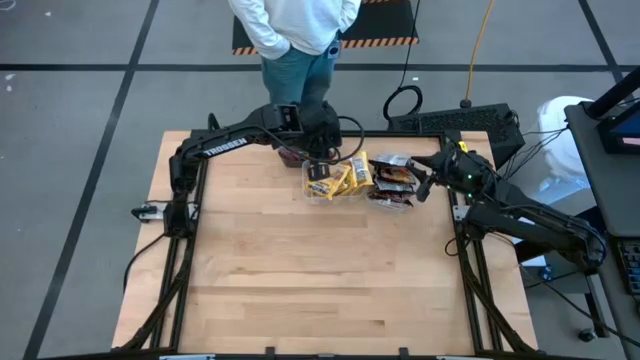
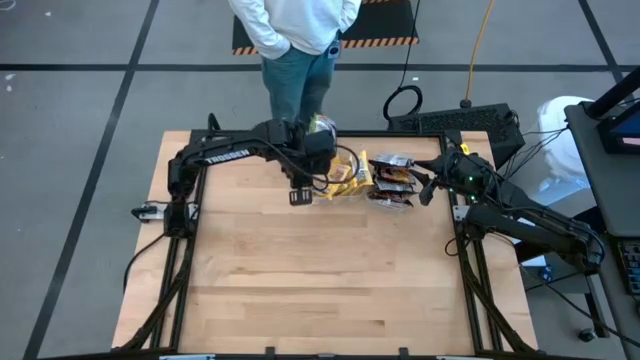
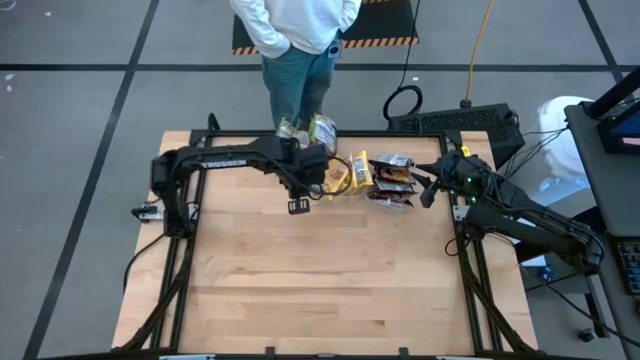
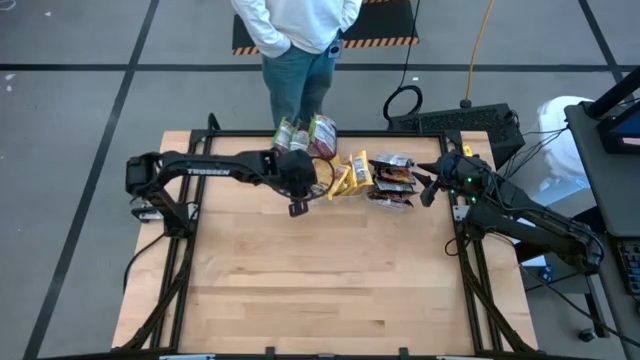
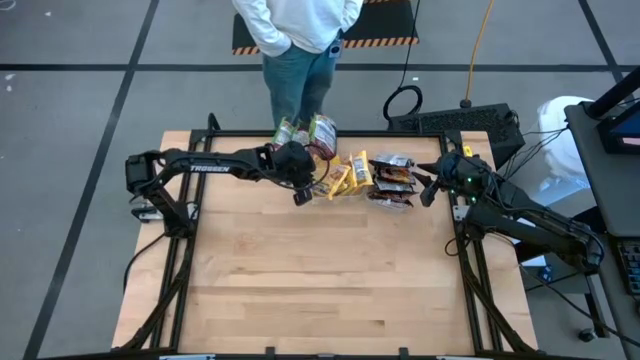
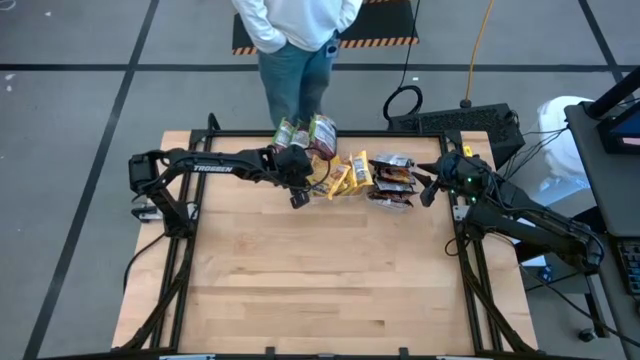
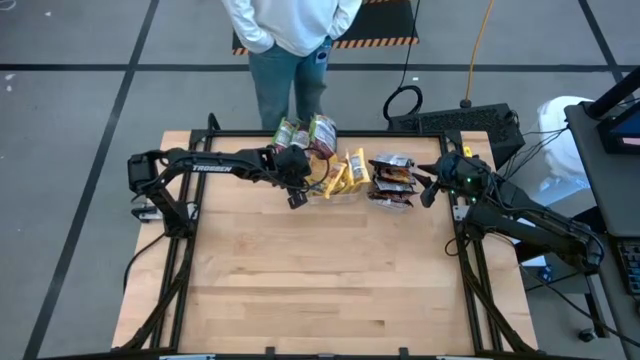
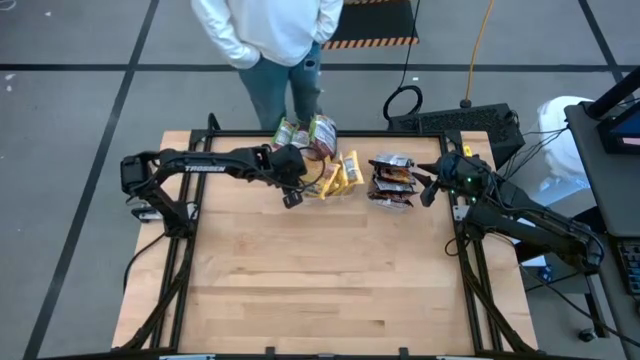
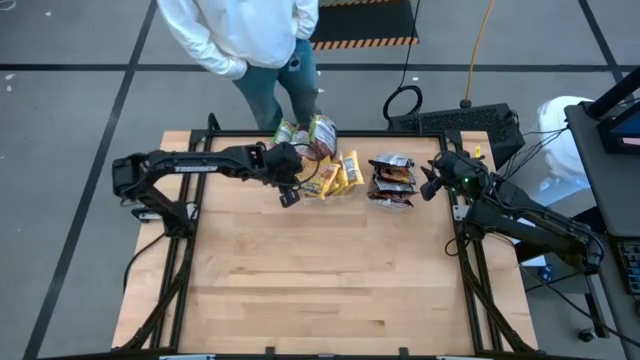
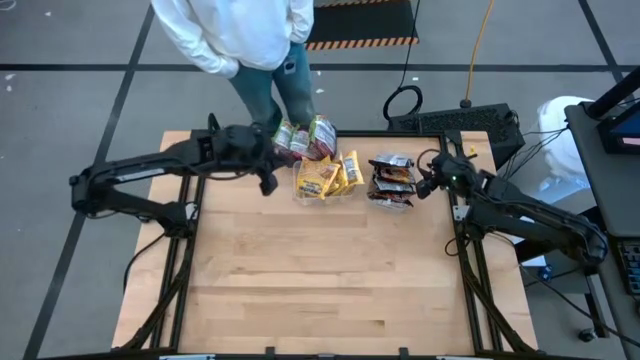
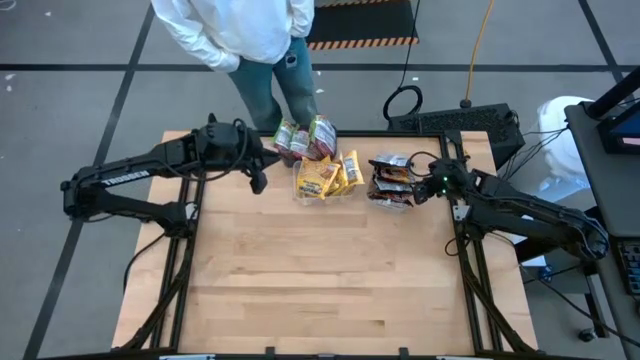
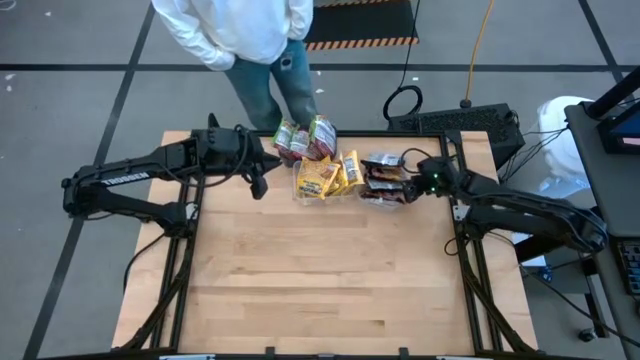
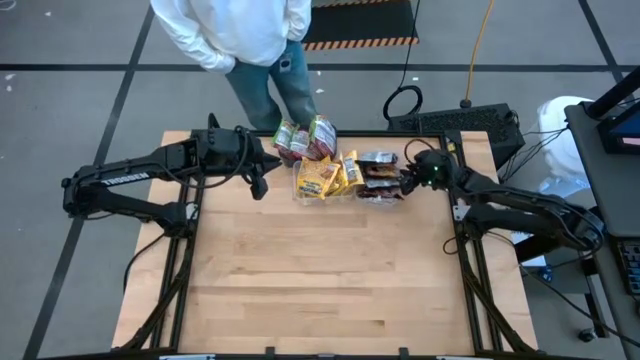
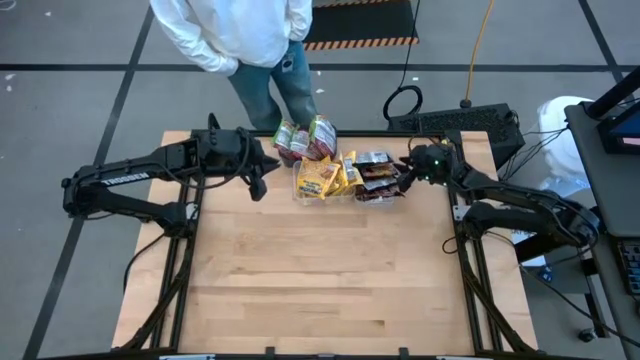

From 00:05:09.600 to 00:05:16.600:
Task: Sort Maruchan noodles
Adjust the transparent bins

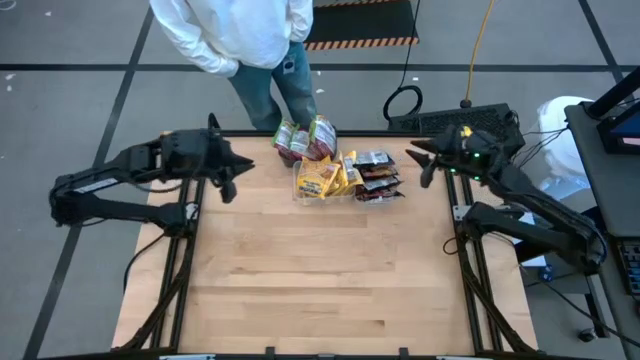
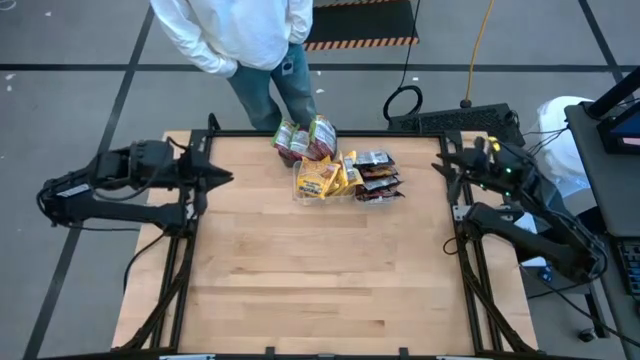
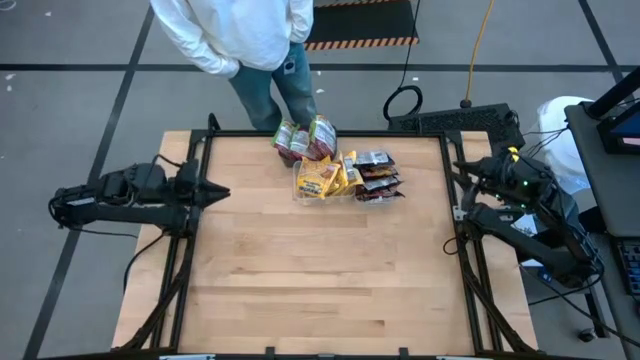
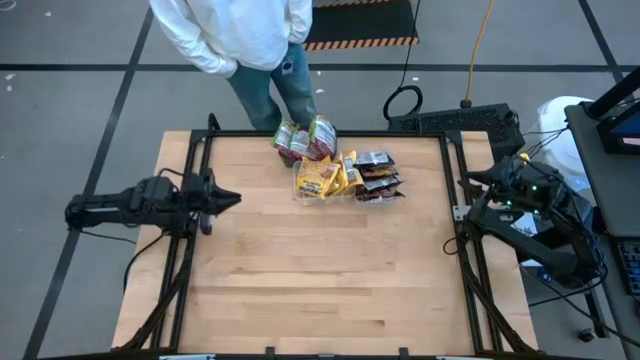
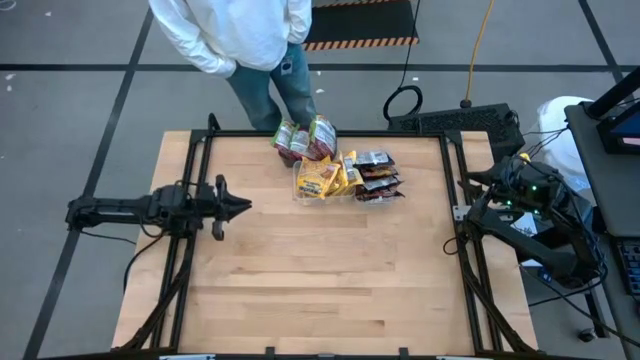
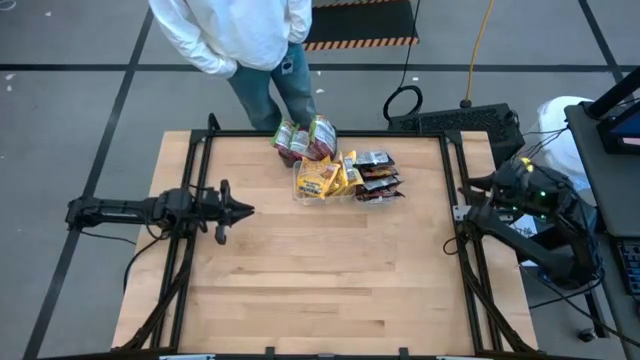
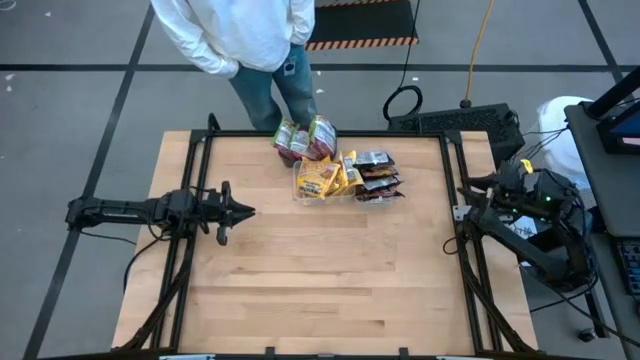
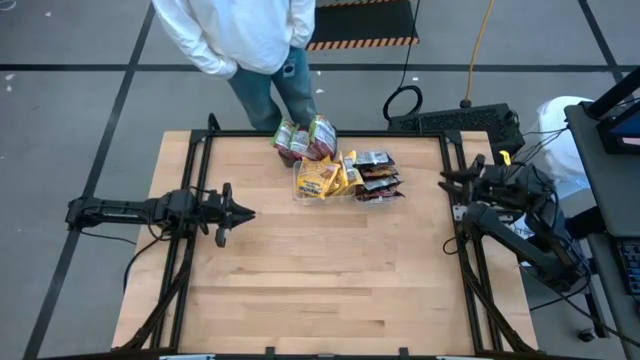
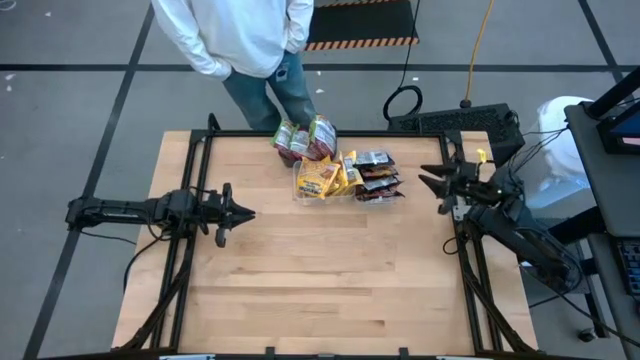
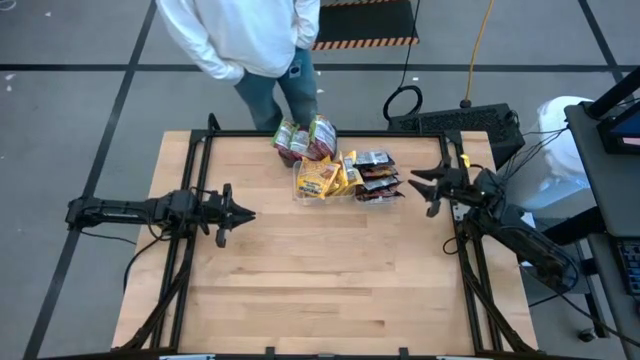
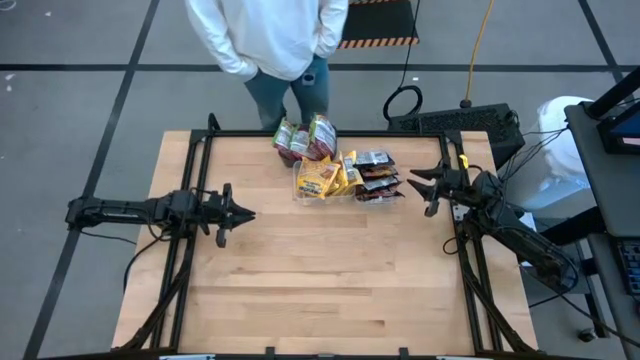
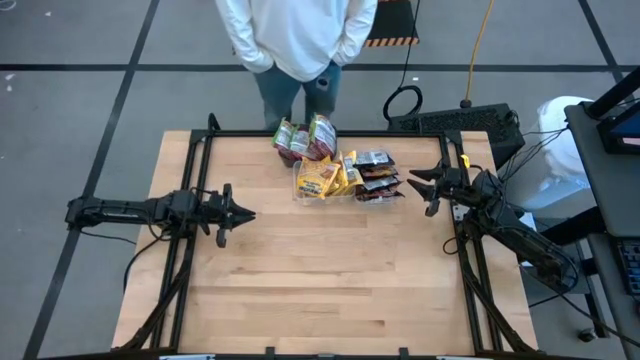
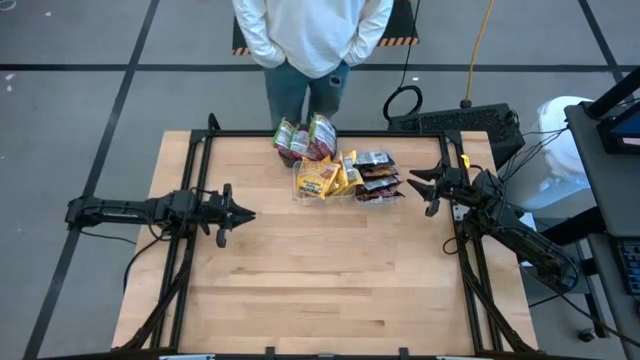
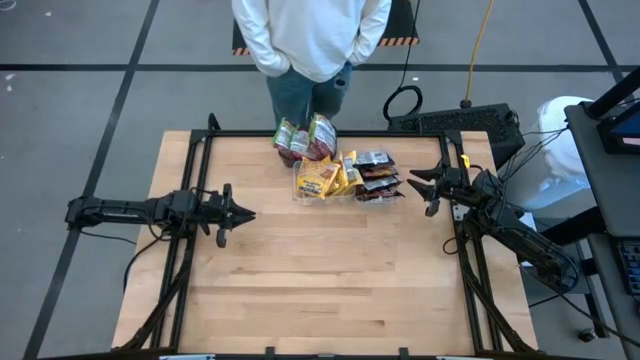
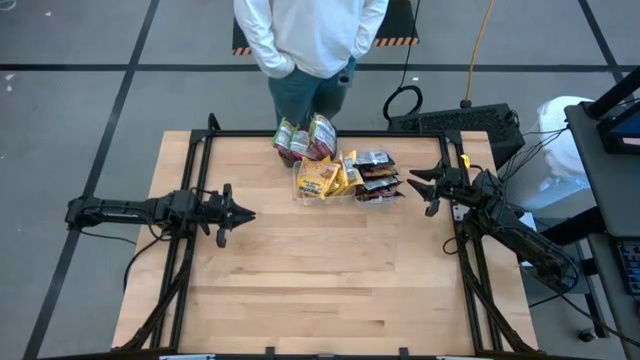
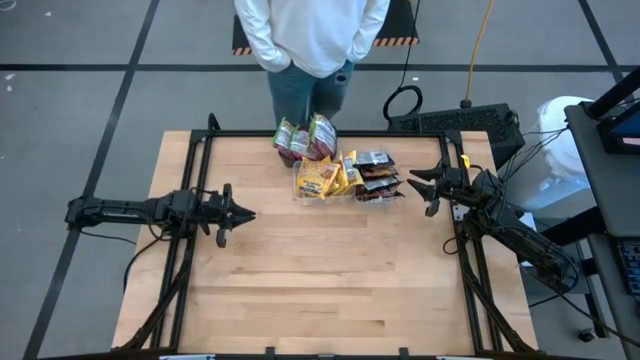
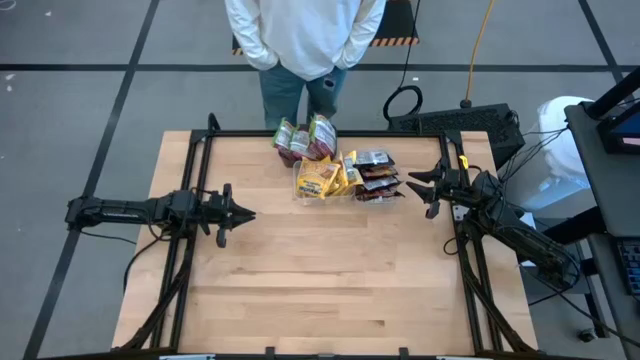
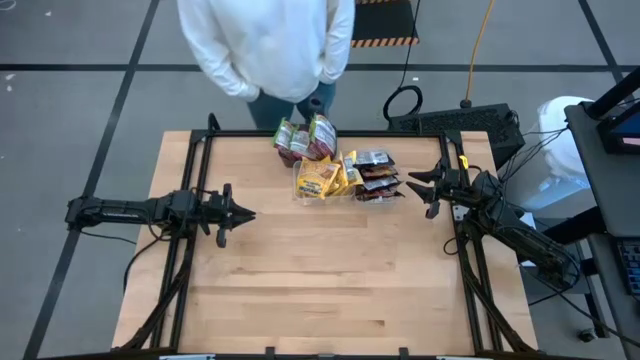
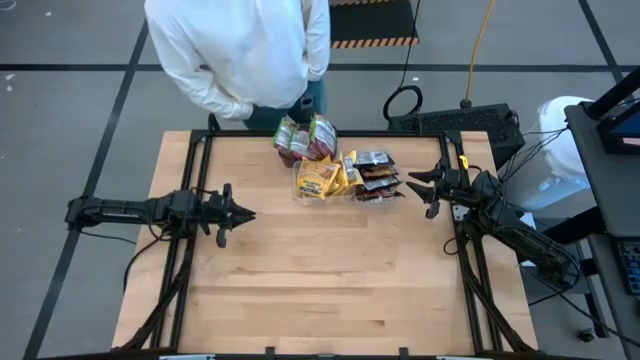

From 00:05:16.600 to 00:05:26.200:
Return to Home Position
